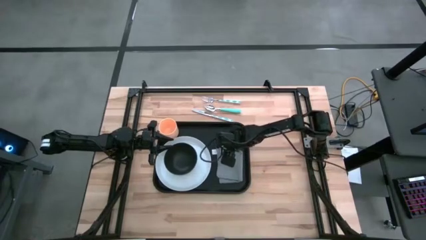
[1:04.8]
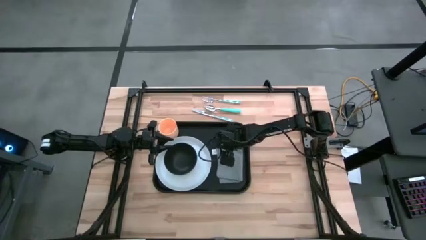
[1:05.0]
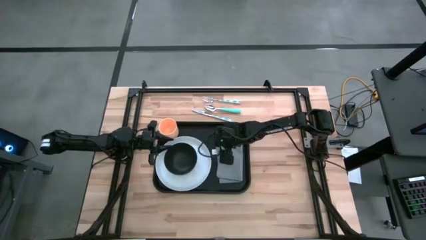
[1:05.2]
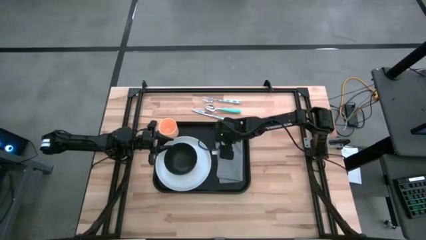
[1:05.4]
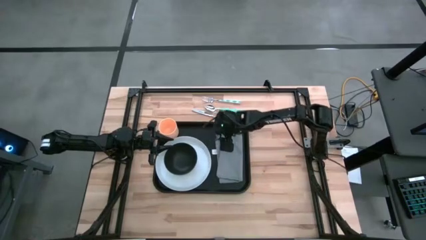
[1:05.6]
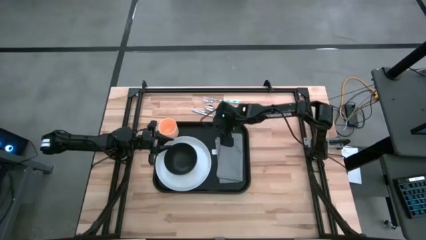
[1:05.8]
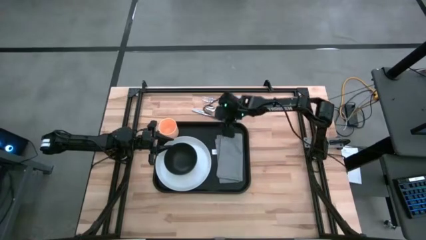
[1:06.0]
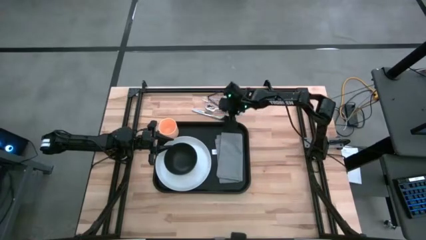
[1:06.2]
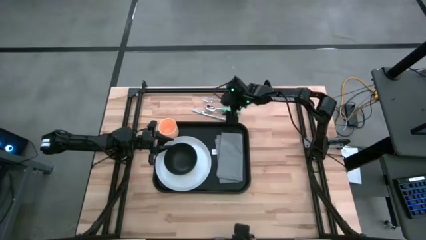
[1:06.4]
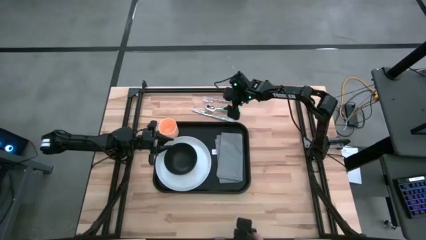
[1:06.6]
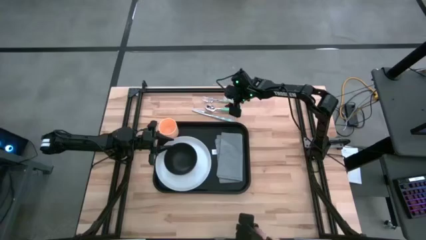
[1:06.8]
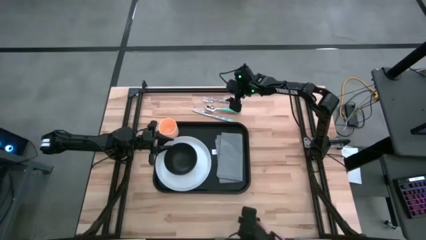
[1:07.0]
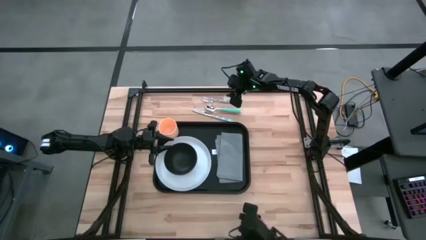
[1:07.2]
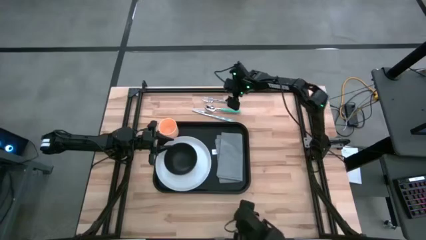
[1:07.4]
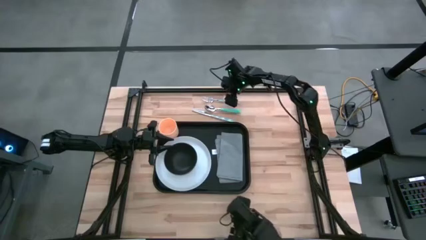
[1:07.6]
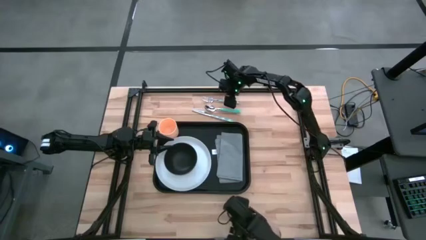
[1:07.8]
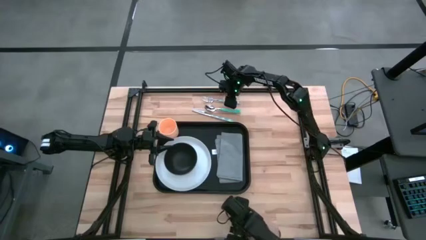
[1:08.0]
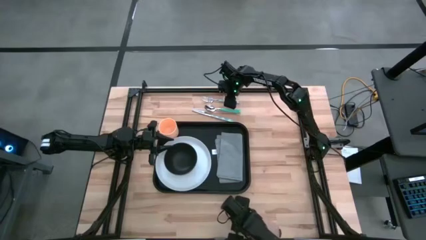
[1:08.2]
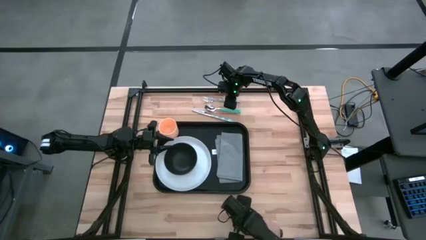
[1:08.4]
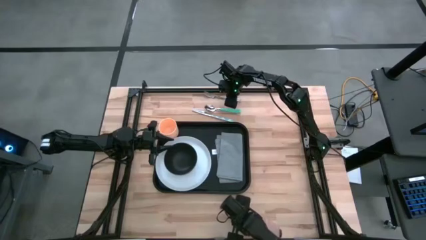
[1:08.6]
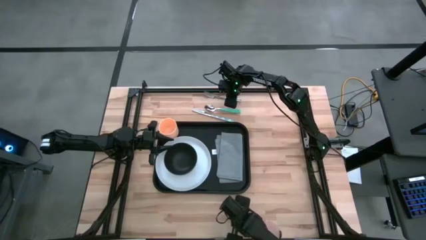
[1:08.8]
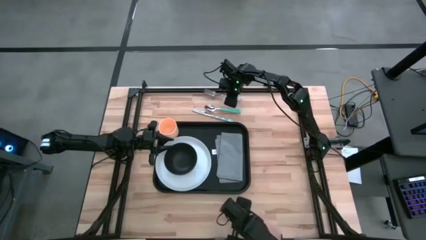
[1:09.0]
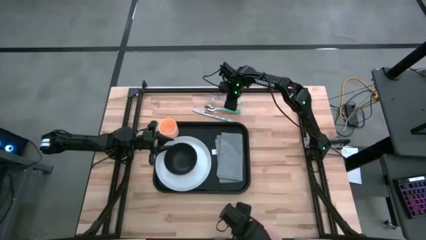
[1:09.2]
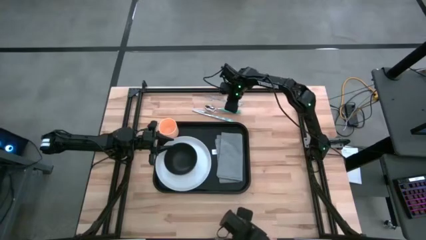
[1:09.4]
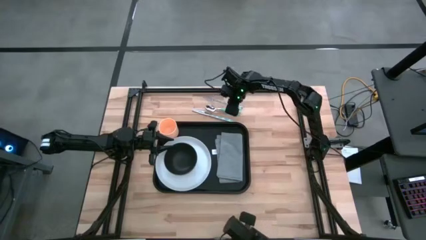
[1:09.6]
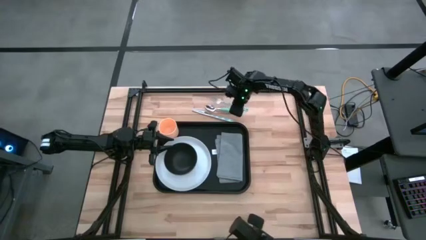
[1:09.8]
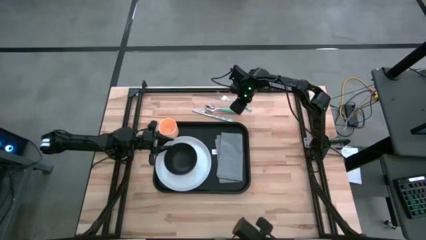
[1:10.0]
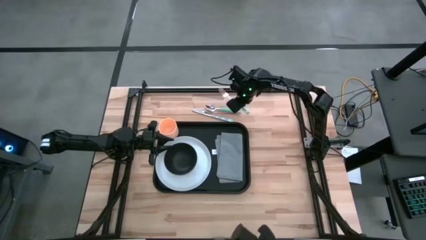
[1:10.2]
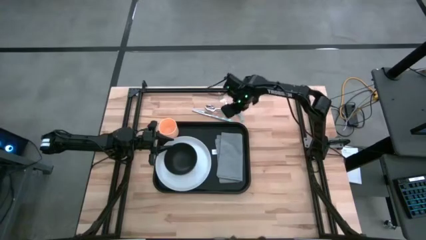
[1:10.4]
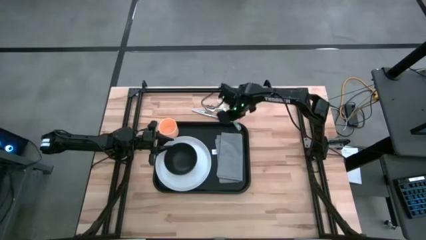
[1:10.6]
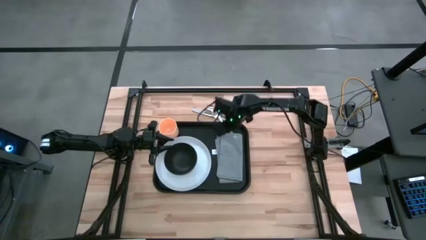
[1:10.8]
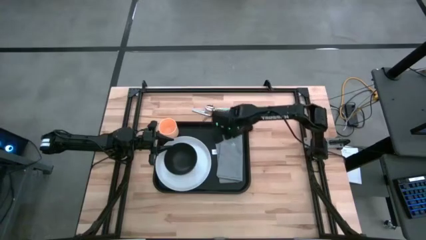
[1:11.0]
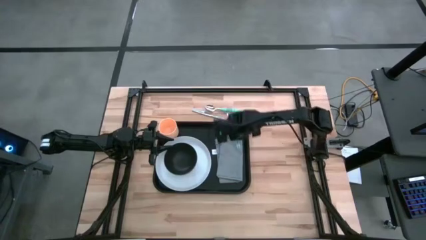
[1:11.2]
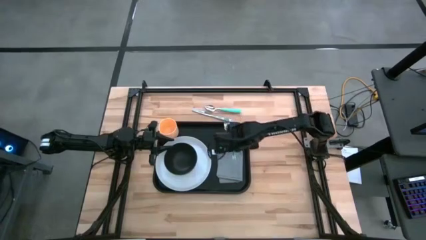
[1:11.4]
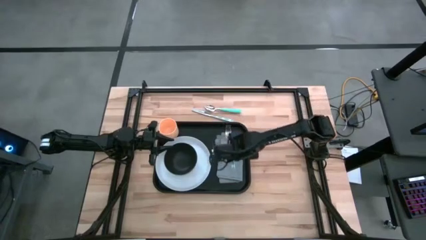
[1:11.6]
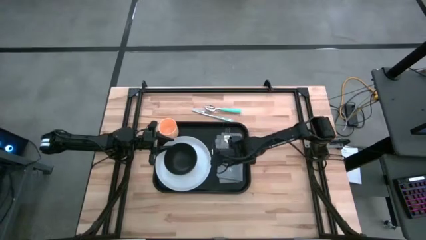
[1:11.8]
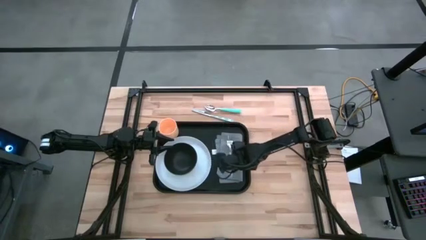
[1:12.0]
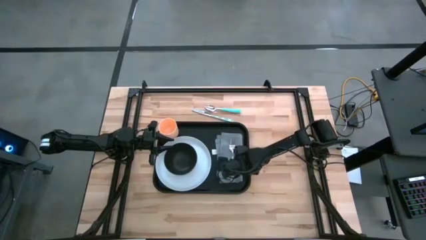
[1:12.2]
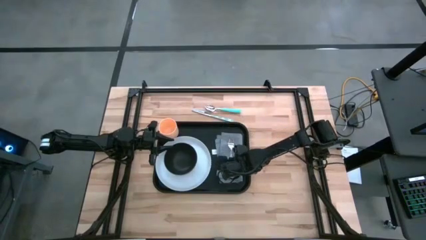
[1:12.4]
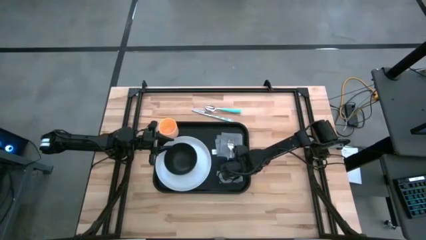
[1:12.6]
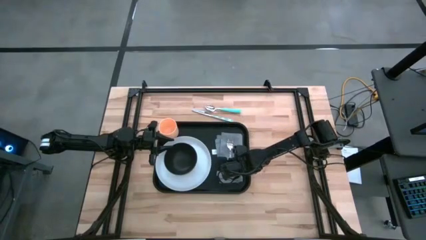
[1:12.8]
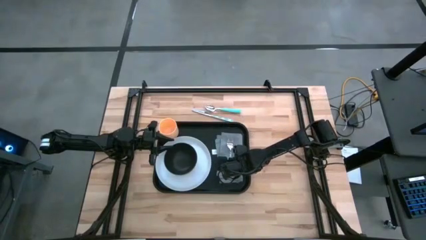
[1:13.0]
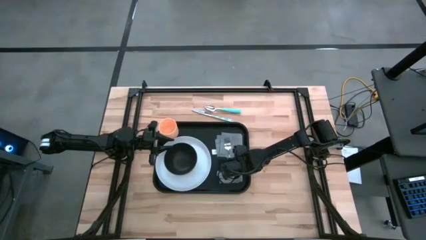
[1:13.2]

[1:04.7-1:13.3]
Task: Set up tray
Put the blue fork on top of the gray napkin

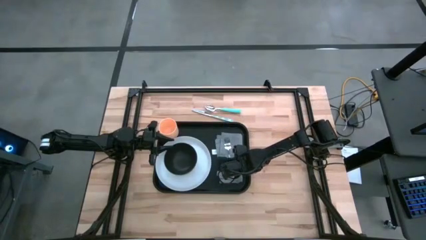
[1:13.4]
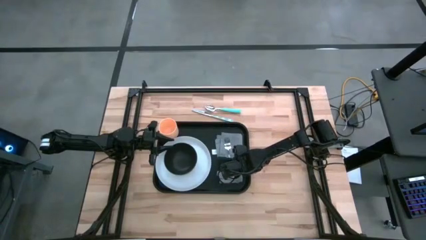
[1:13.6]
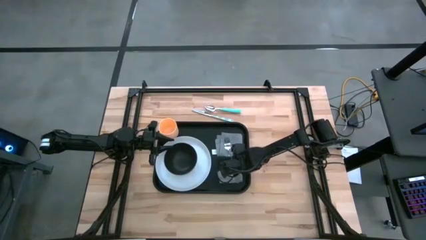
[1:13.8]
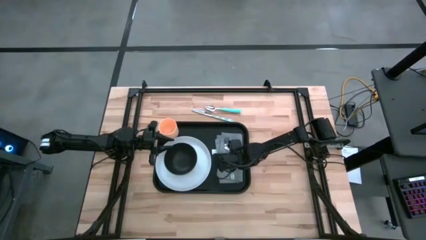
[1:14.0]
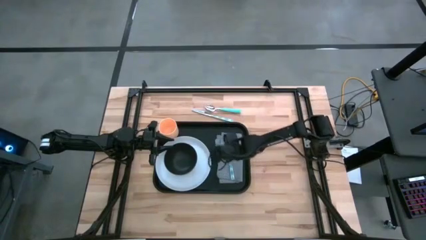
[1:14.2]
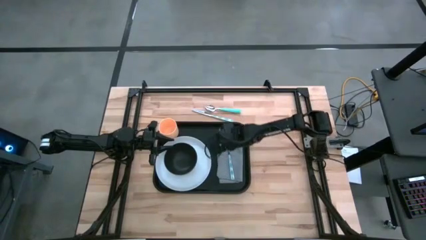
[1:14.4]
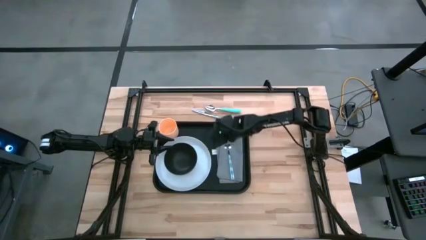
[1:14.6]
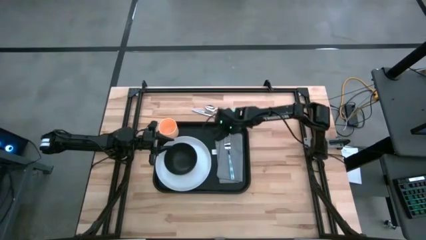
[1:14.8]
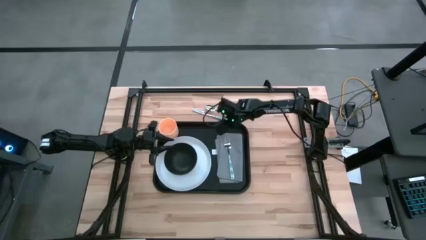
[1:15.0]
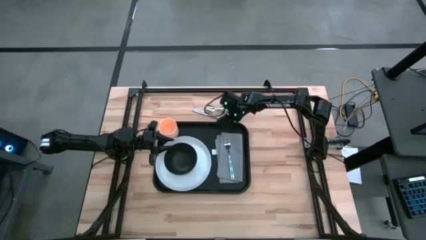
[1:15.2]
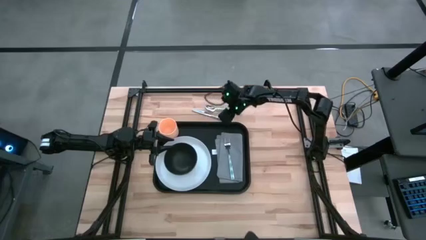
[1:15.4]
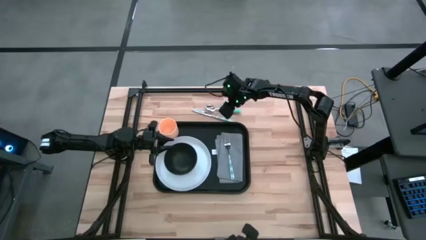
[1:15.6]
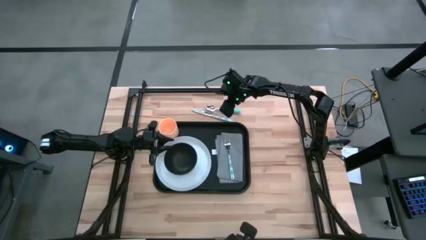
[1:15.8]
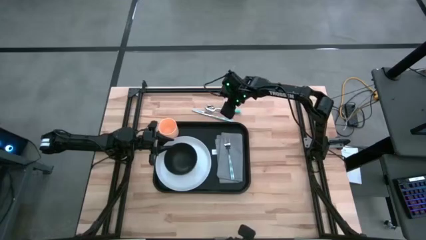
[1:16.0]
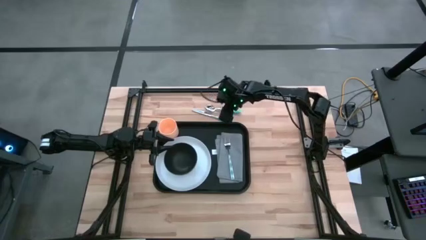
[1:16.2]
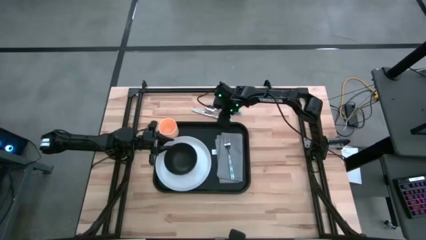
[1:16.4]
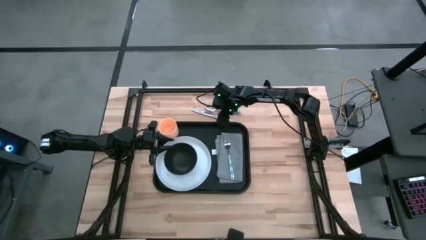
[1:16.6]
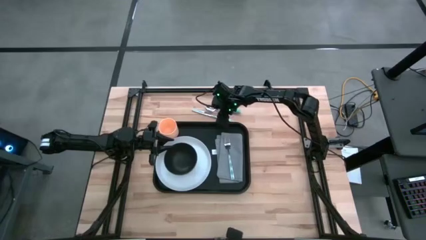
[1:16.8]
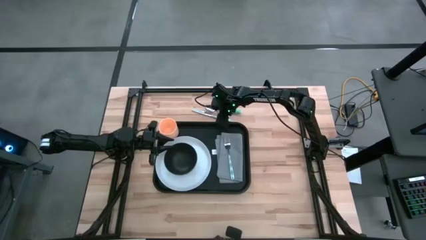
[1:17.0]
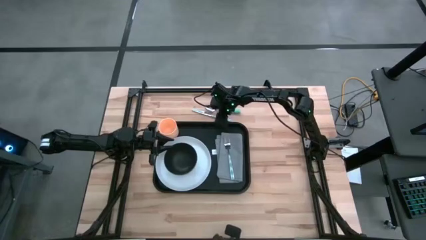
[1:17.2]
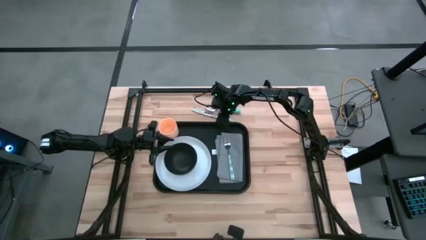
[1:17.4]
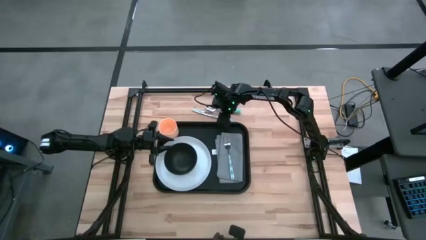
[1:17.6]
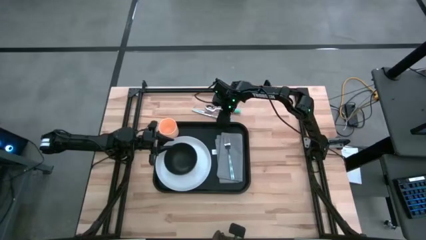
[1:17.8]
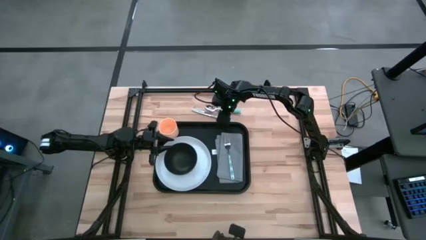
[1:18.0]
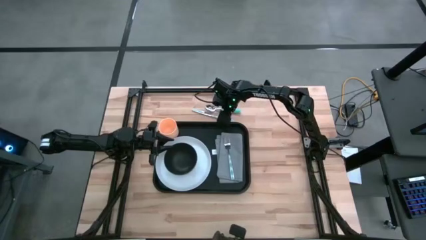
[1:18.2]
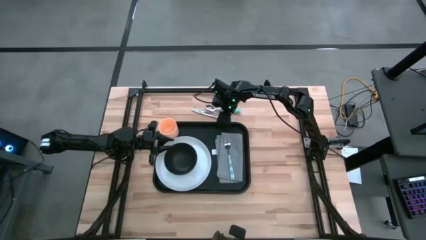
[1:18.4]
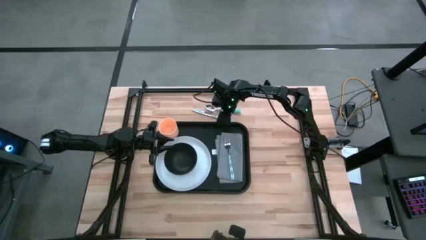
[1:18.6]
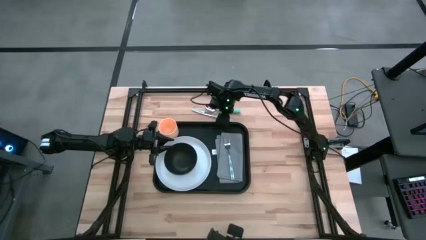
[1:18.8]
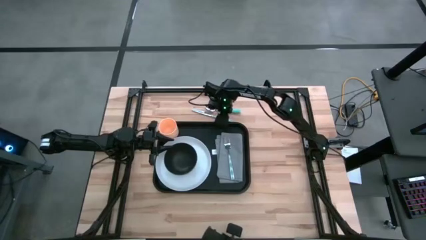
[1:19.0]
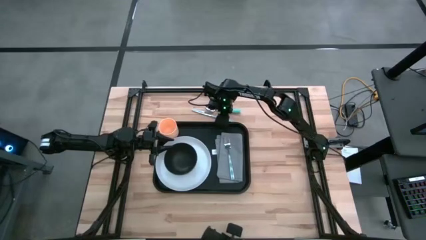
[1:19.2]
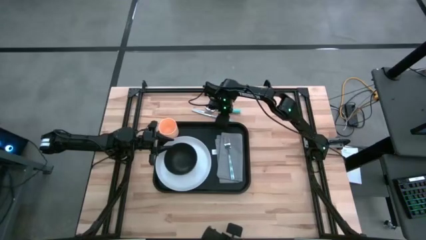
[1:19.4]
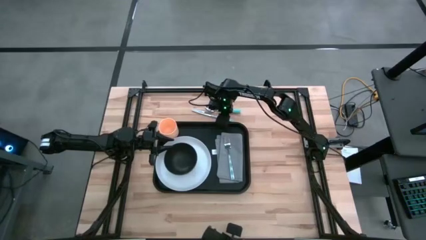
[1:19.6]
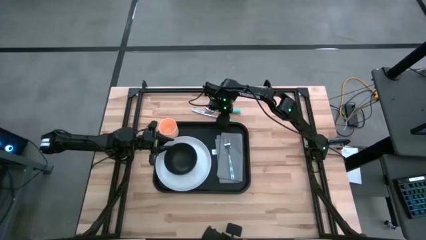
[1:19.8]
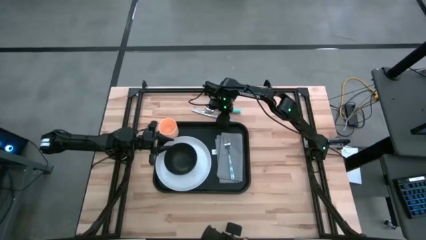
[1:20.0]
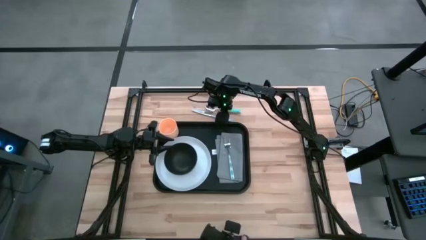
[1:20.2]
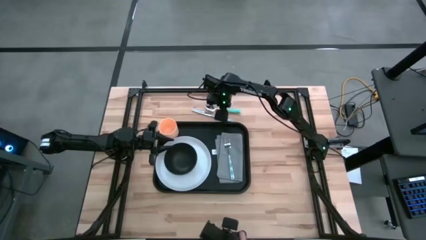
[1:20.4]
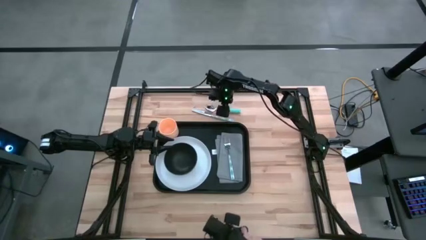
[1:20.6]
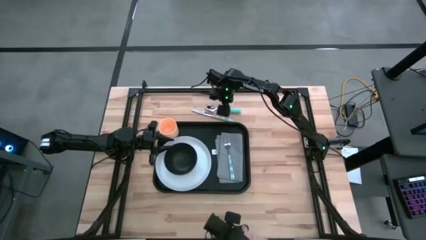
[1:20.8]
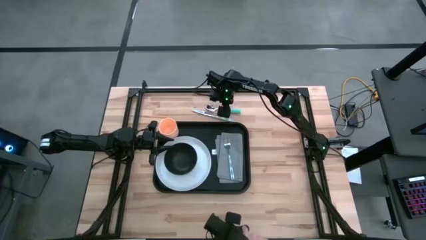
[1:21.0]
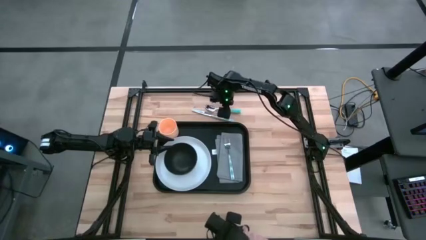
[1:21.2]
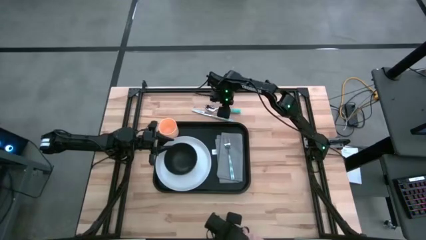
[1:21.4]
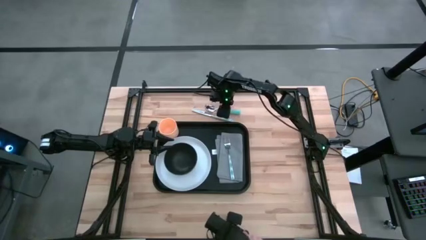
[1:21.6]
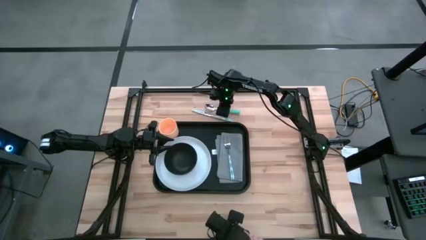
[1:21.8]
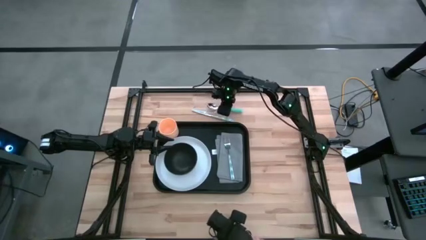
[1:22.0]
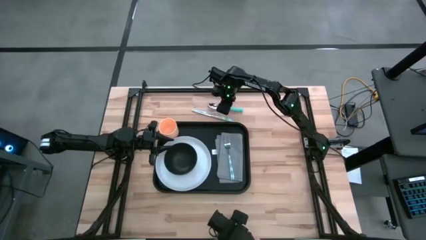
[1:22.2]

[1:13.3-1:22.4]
Put the blue spoon on top of the gray napkin beside the blue fork on the black serving tray
